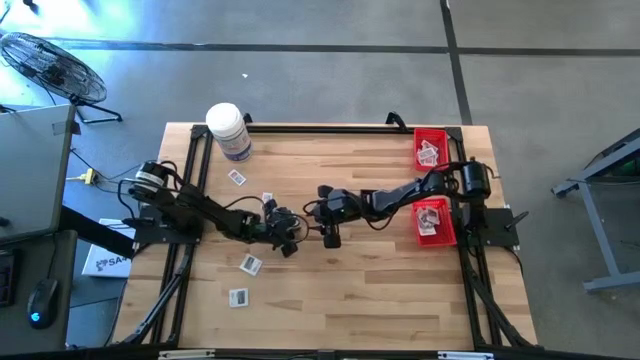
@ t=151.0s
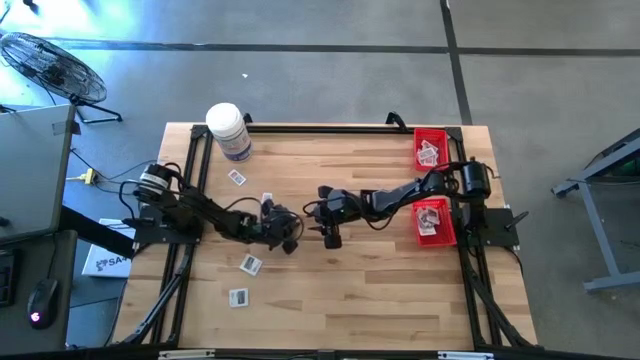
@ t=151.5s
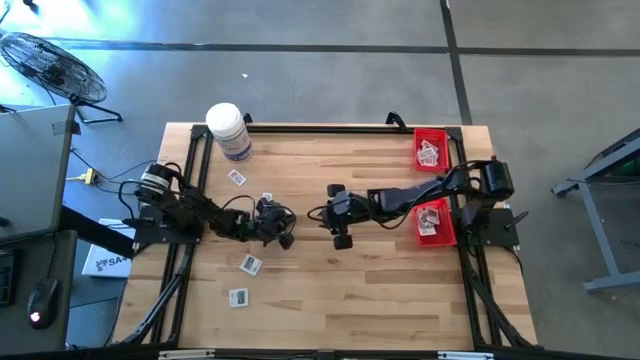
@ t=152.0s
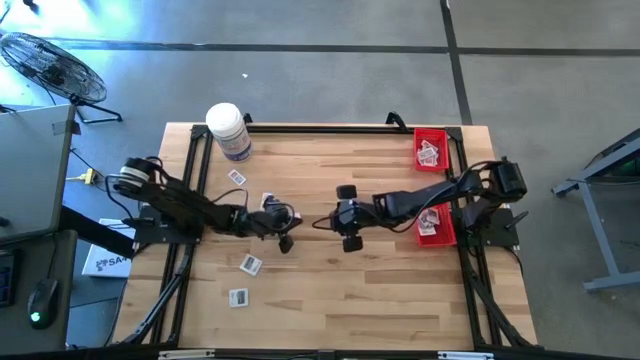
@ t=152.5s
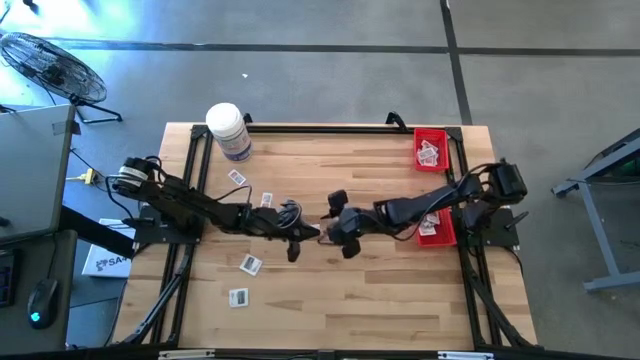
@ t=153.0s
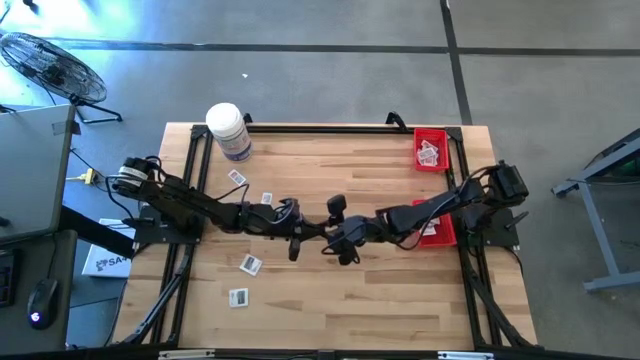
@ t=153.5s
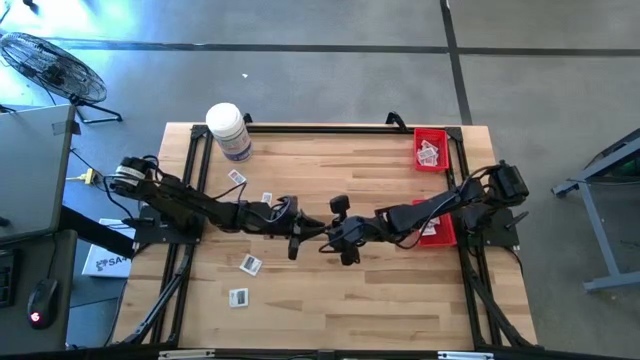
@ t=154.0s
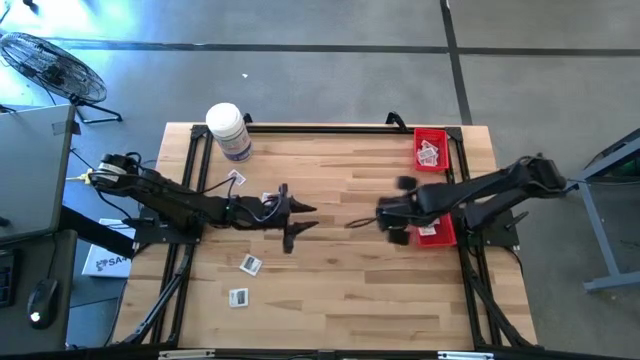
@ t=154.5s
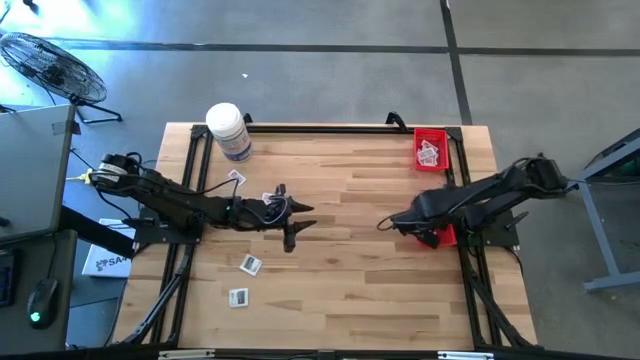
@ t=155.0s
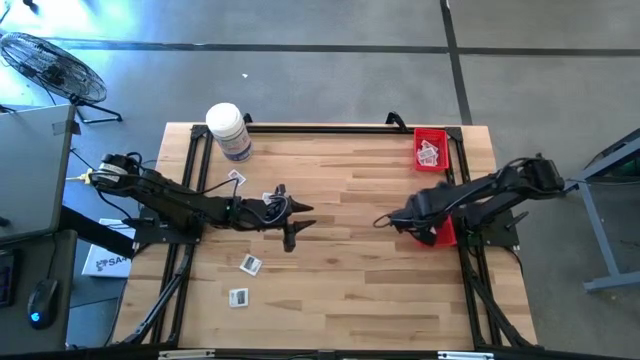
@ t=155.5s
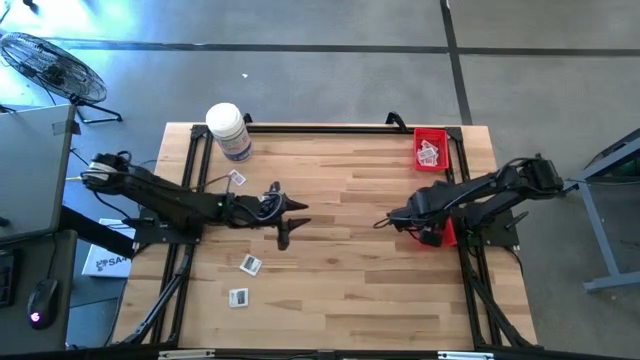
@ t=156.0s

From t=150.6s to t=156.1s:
Task: Pick & Place First Aid Supplies
Put the towelette pack into the bottom basket

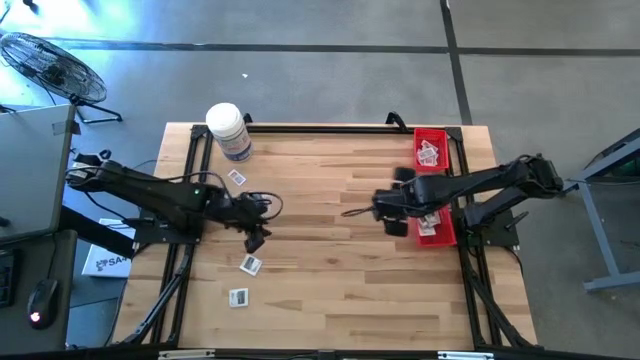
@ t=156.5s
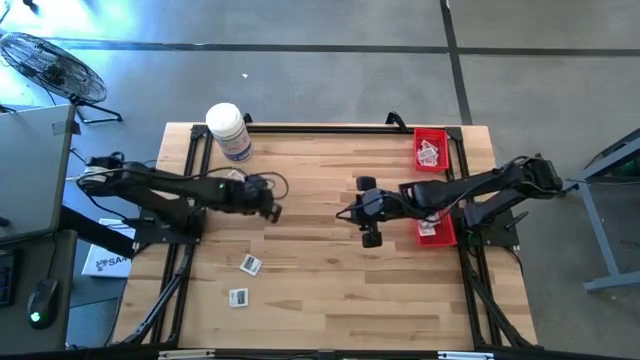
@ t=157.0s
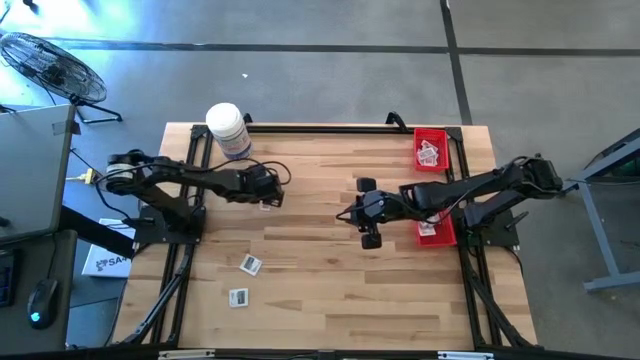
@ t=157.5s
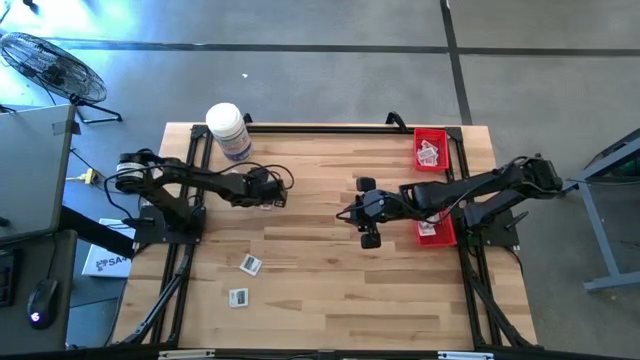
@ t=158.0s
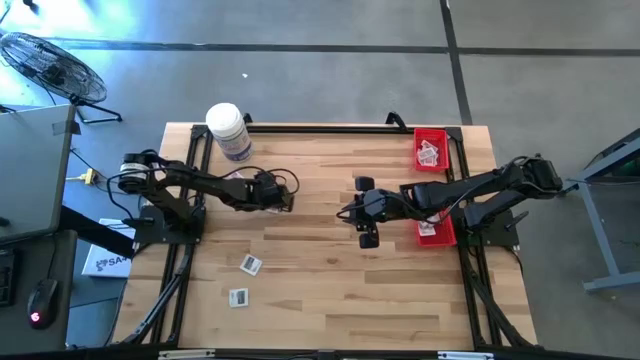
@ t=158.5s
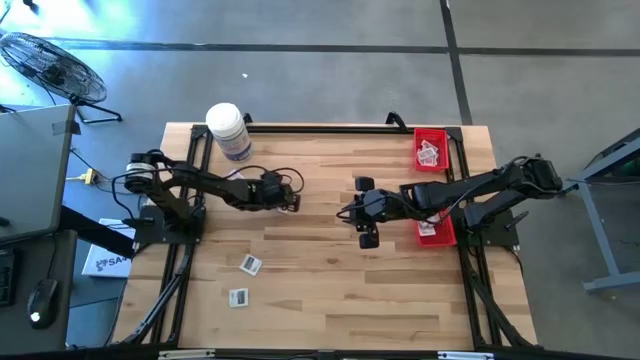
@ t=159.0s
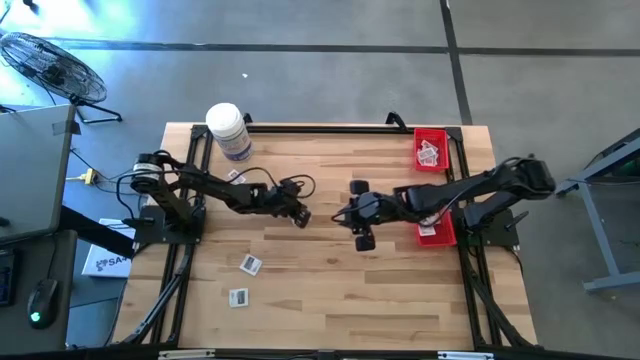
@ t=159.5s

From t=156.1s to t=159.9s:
Put the ointment pack into the top basket

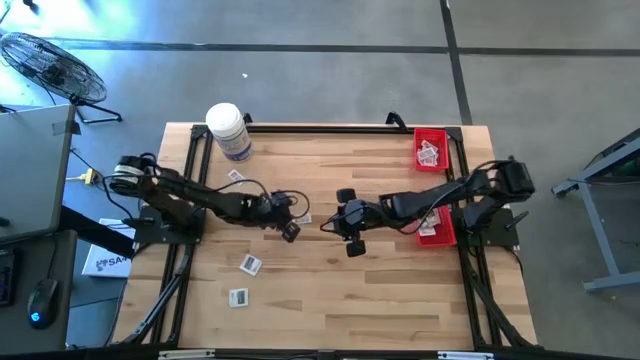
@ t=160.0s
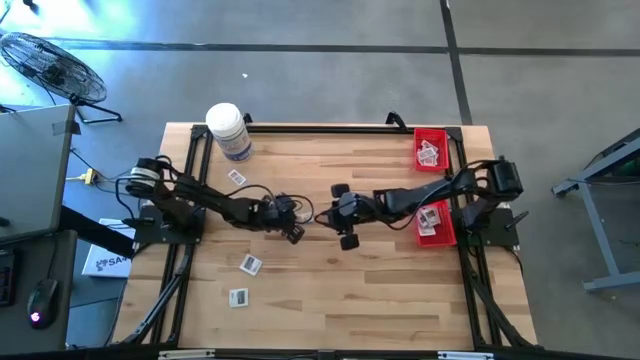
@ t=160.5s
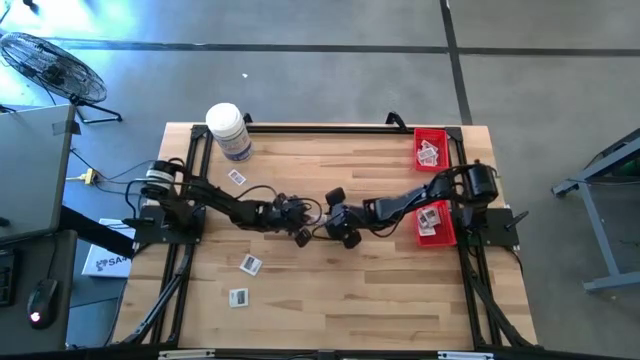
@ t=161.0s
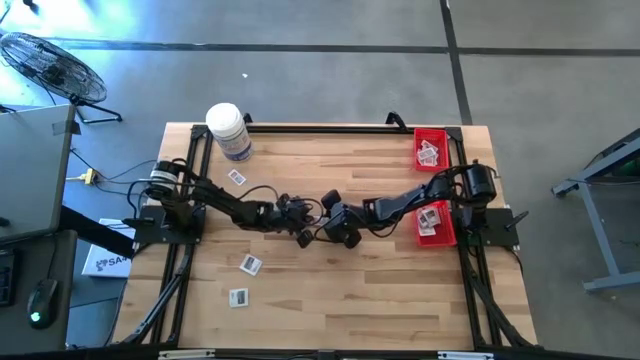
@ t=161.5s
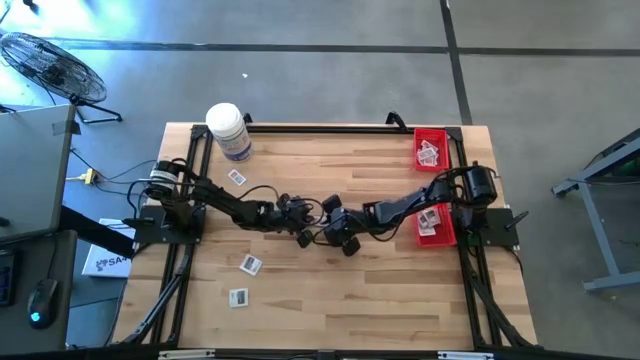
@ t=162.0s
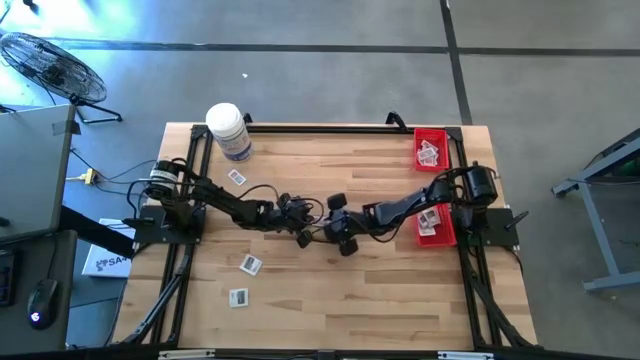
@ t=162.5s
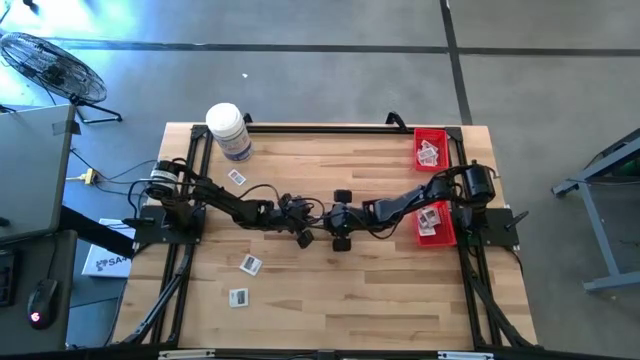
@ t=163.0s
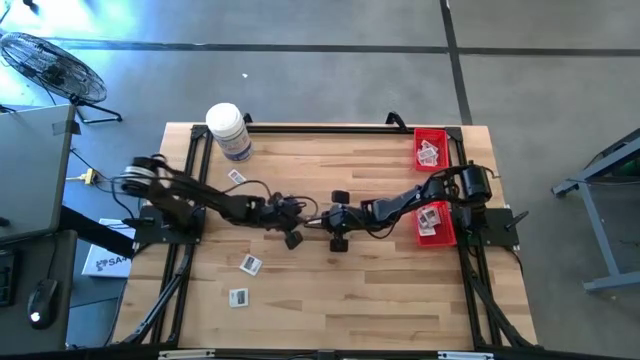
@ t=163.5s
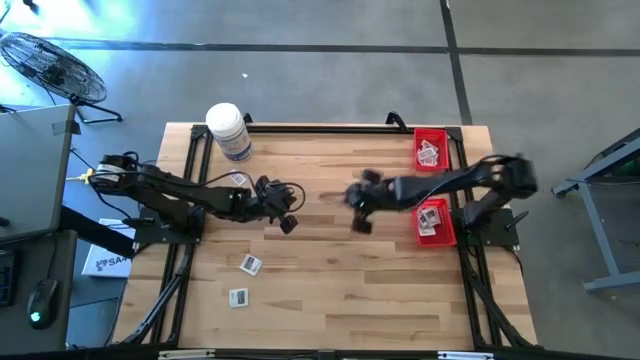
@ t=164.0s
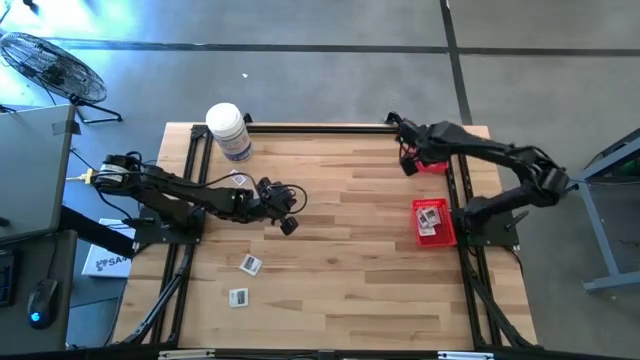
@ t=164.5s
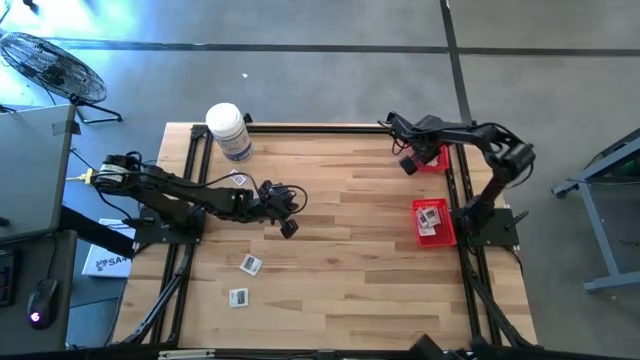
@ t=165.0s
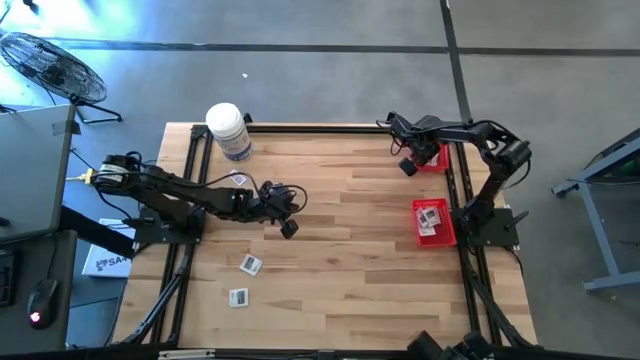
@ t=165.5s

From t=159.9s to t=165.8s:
Put the ointment pack into the top basket

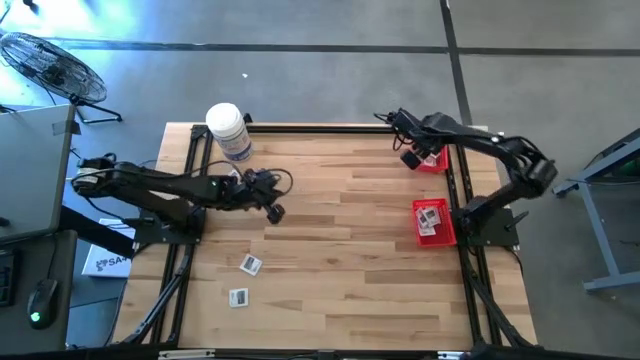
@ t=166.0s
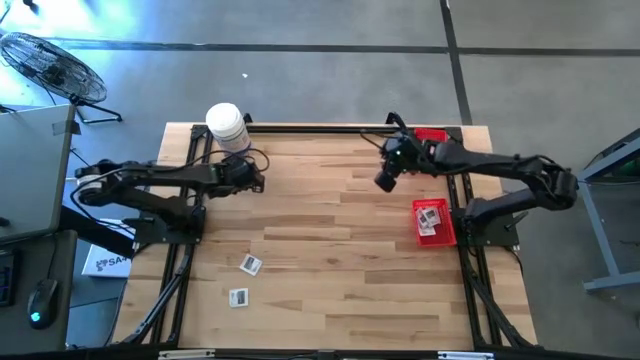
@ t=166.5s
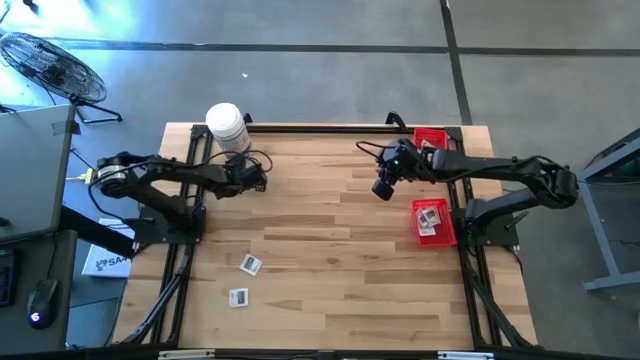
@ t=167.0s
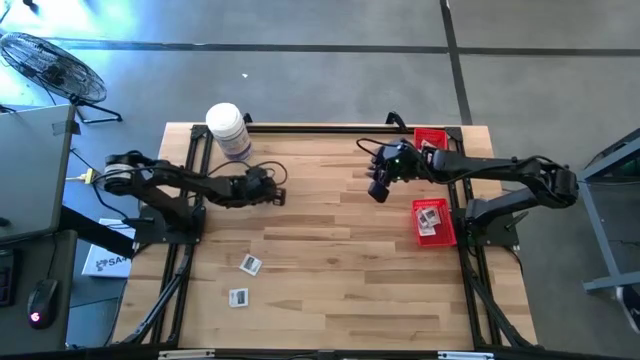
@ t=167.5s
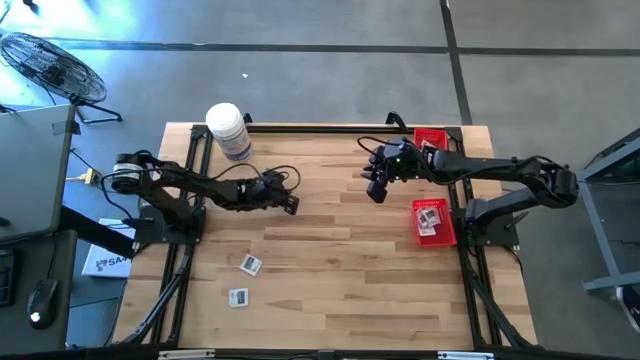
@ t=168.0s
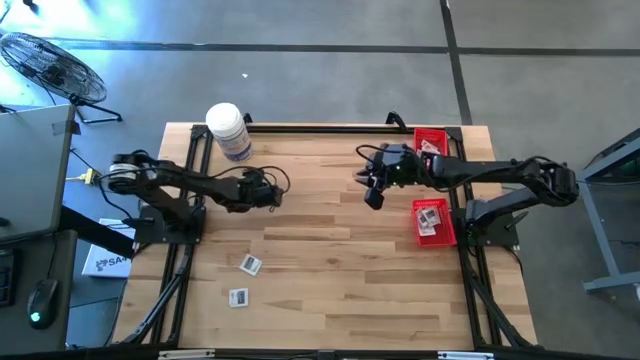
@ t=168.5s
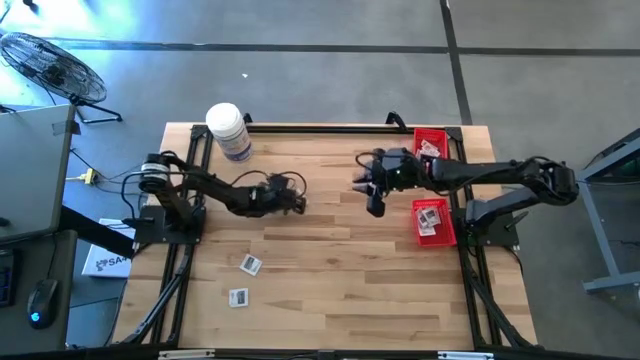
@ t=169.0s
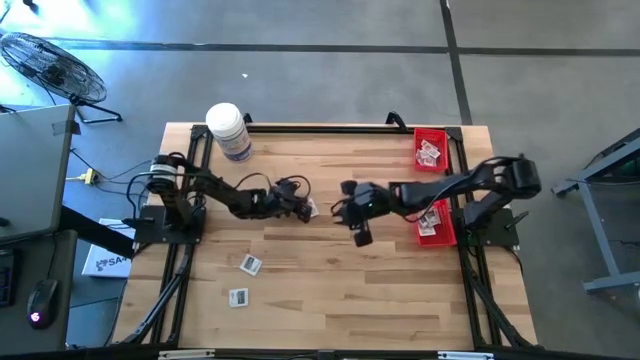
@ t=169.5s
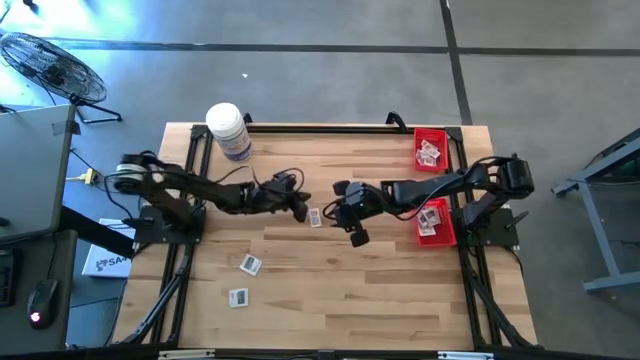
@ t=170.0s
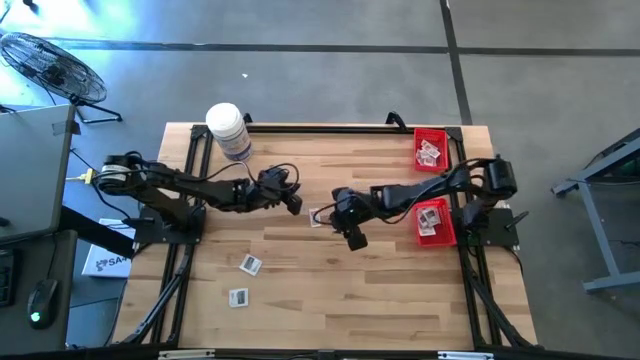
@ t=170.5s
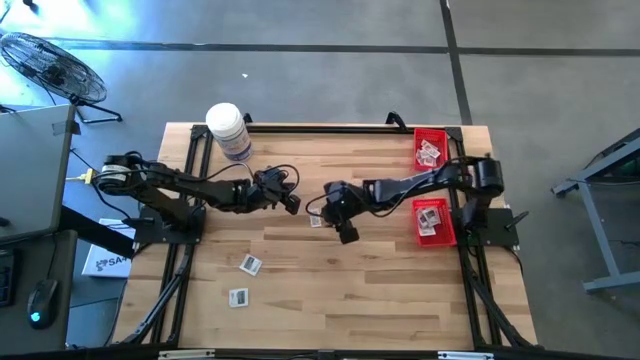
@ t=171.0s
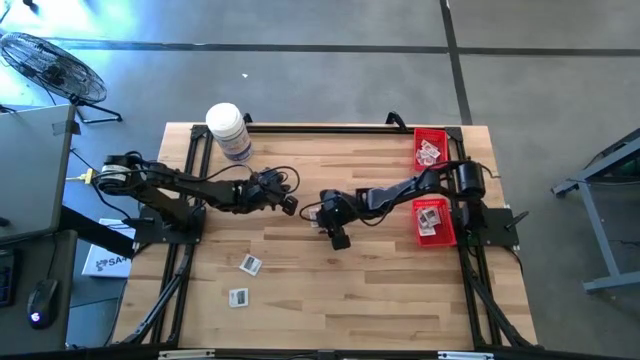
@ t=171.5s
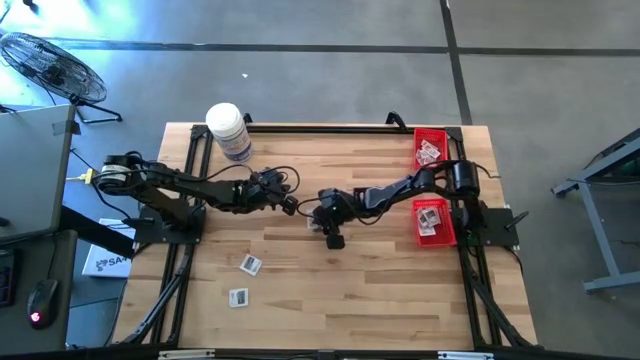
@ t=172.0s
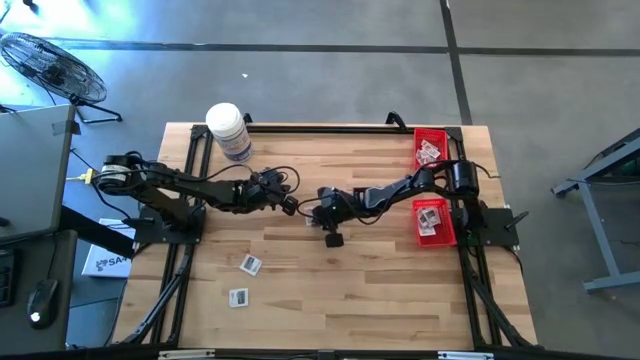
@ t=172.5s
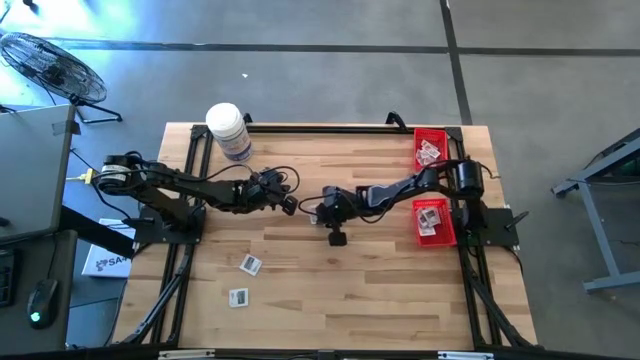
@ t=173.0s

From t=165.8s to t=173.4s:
Put the ointment pack into the top basket
